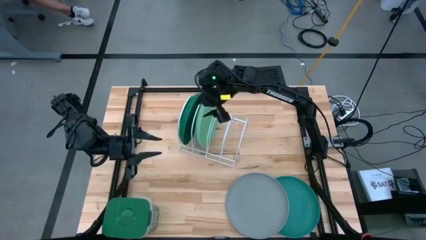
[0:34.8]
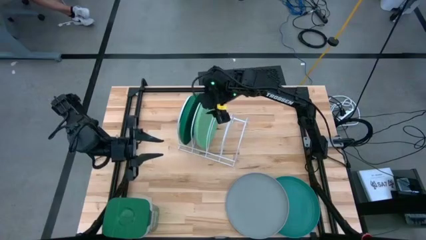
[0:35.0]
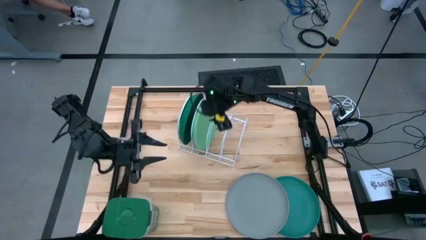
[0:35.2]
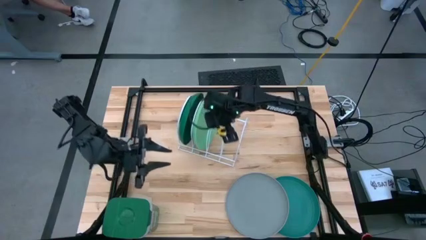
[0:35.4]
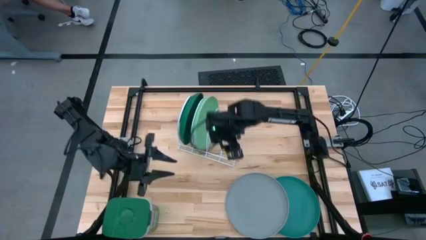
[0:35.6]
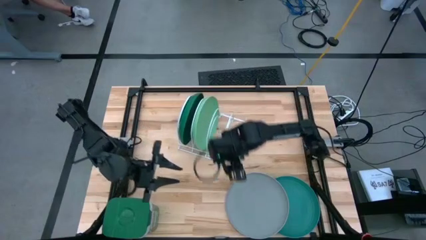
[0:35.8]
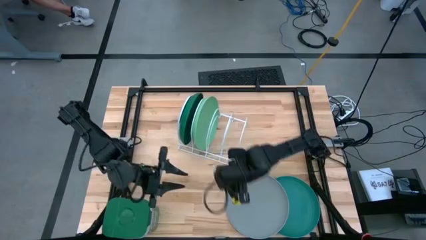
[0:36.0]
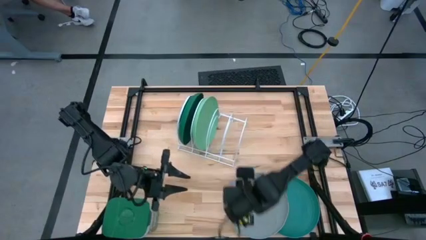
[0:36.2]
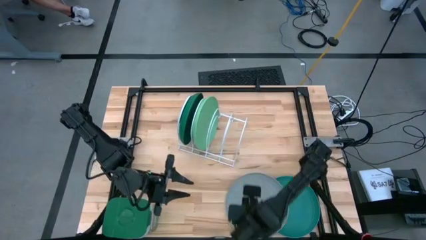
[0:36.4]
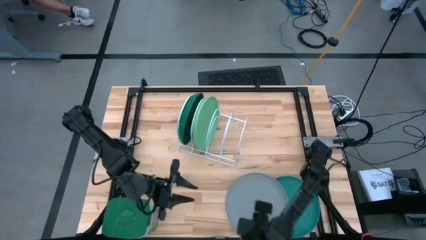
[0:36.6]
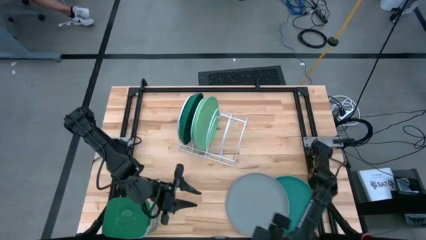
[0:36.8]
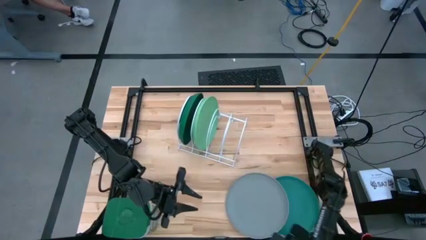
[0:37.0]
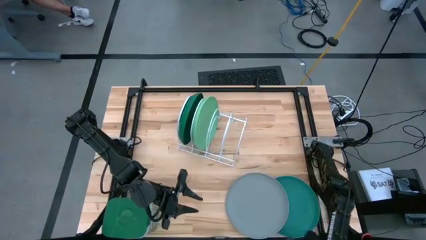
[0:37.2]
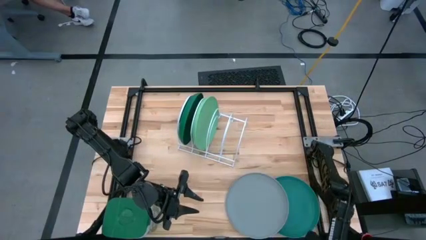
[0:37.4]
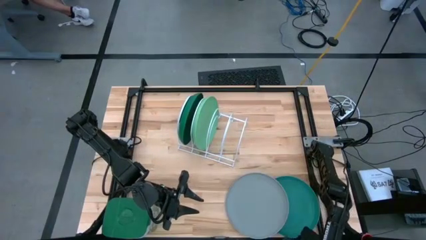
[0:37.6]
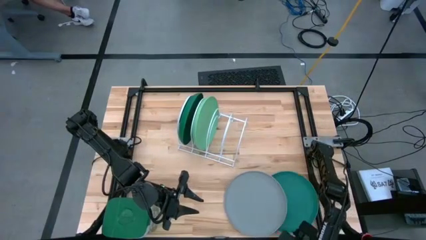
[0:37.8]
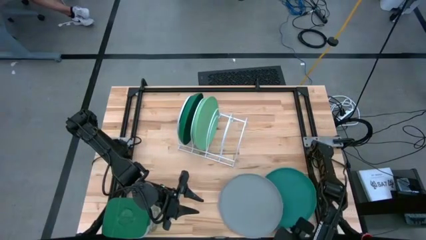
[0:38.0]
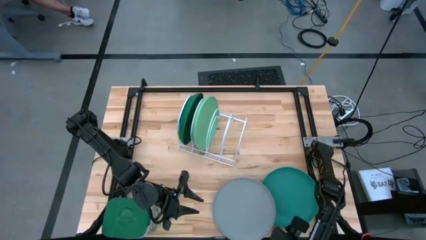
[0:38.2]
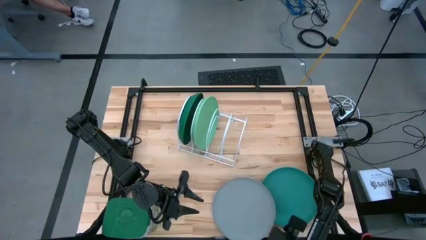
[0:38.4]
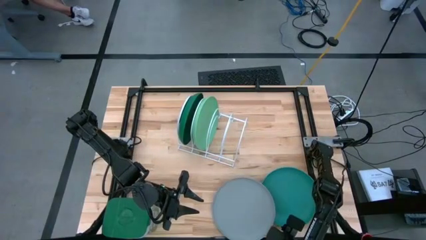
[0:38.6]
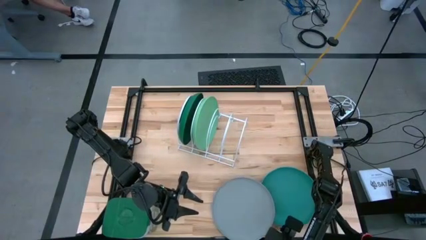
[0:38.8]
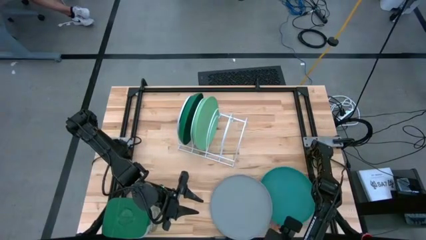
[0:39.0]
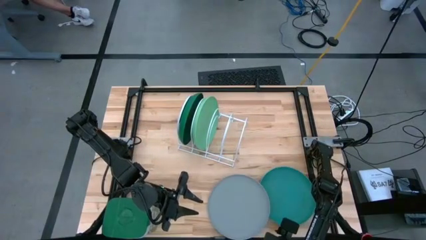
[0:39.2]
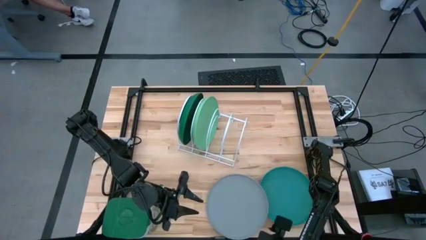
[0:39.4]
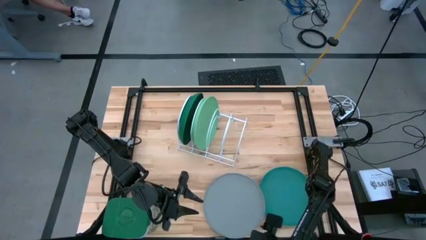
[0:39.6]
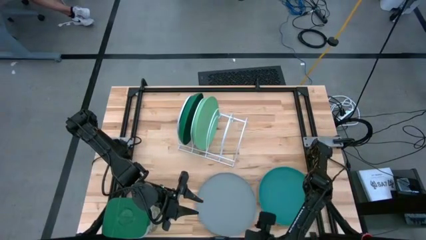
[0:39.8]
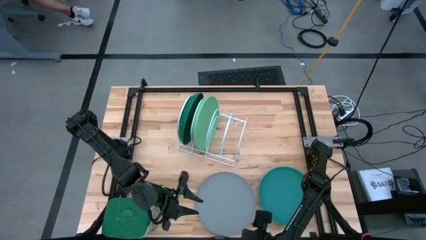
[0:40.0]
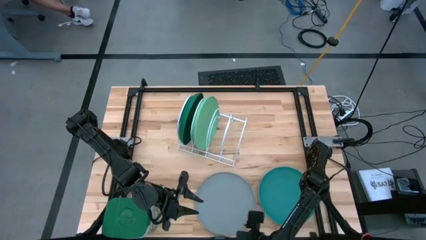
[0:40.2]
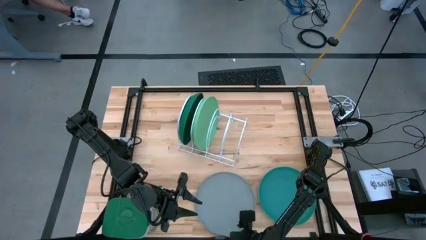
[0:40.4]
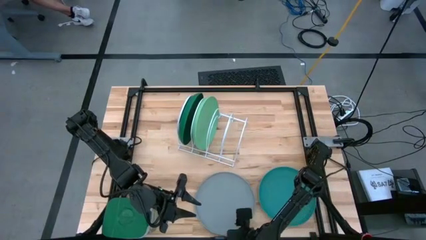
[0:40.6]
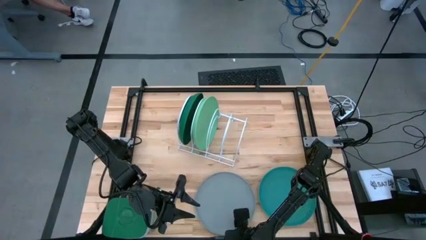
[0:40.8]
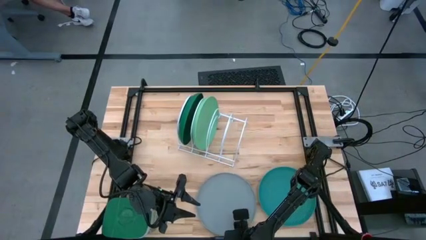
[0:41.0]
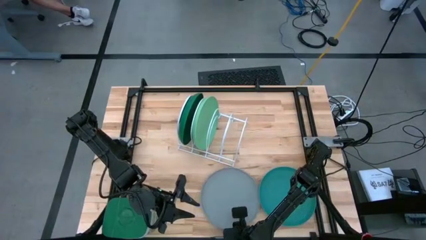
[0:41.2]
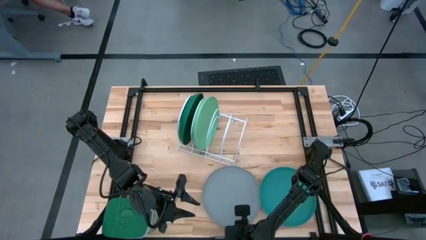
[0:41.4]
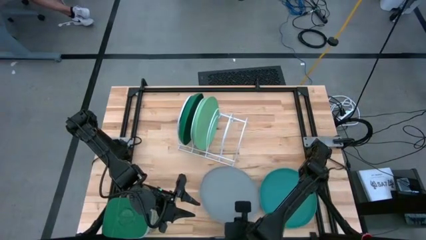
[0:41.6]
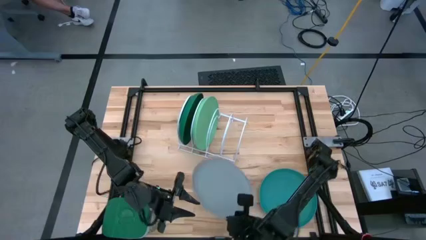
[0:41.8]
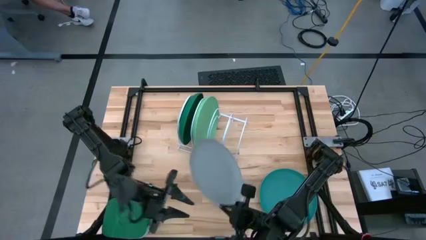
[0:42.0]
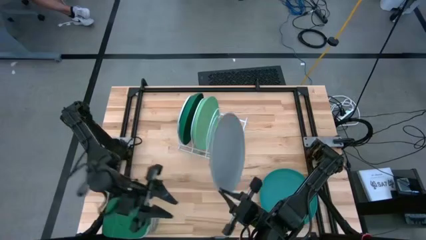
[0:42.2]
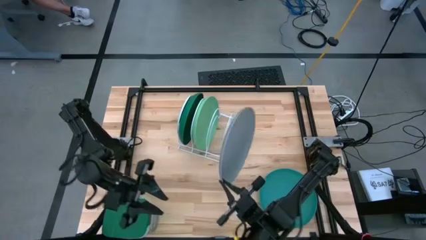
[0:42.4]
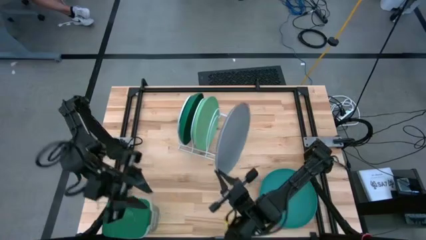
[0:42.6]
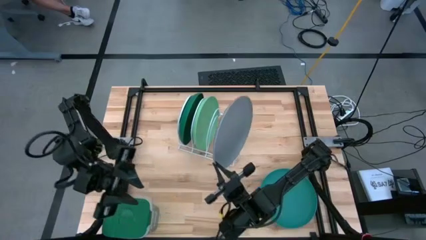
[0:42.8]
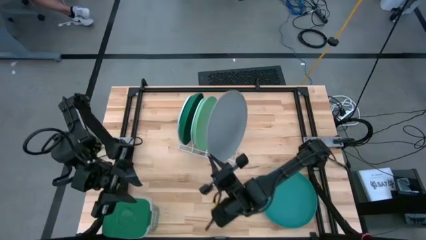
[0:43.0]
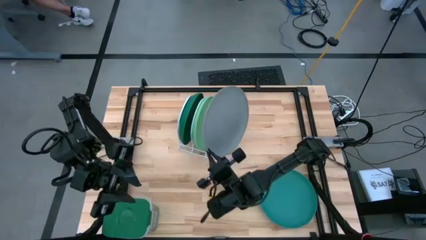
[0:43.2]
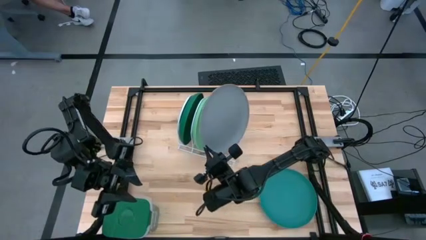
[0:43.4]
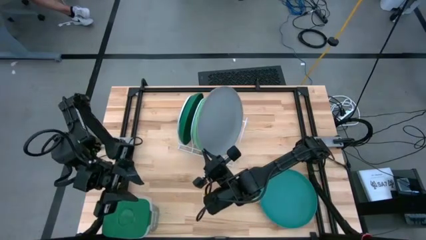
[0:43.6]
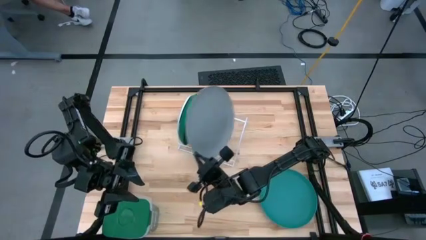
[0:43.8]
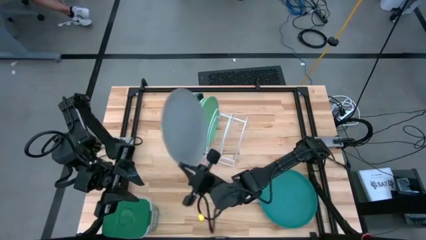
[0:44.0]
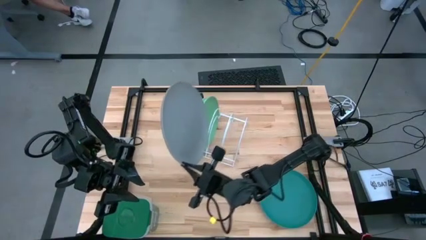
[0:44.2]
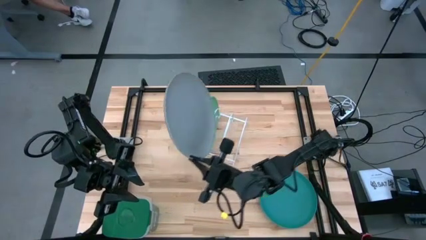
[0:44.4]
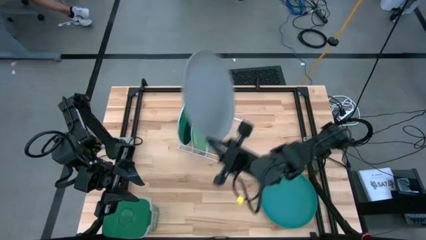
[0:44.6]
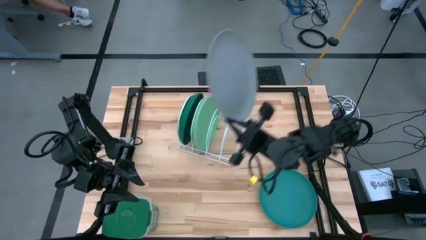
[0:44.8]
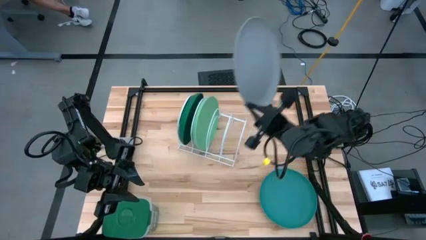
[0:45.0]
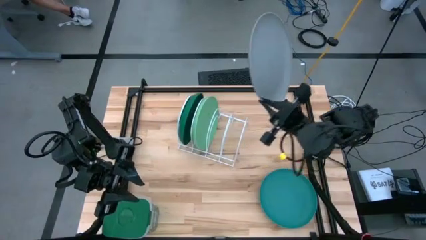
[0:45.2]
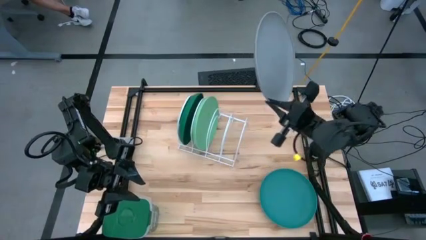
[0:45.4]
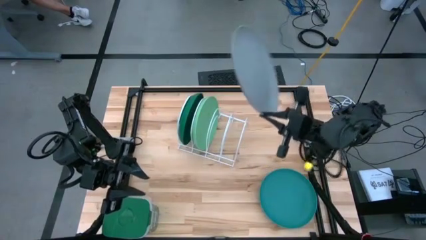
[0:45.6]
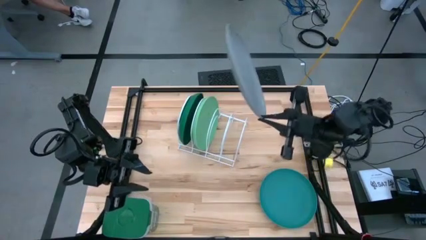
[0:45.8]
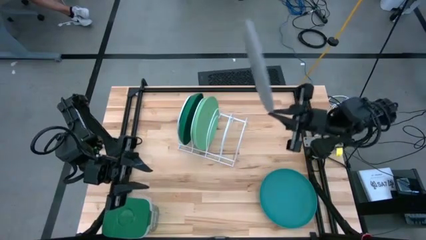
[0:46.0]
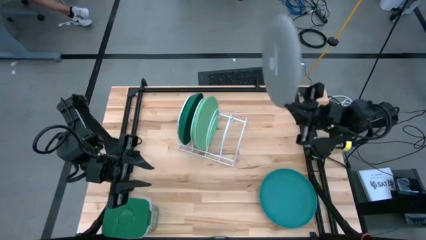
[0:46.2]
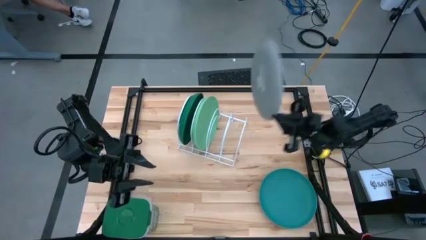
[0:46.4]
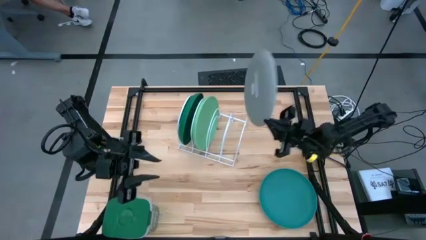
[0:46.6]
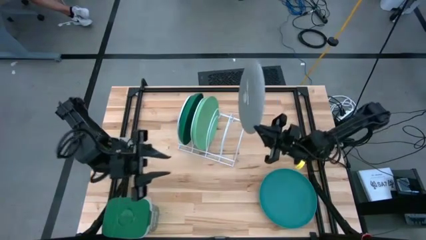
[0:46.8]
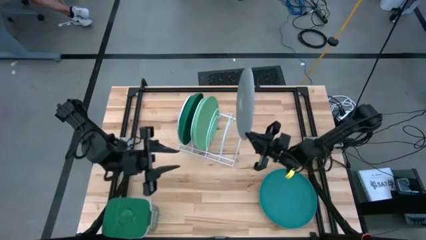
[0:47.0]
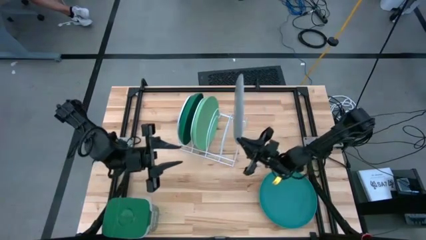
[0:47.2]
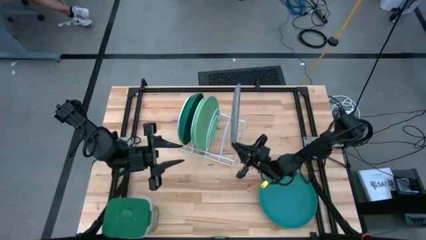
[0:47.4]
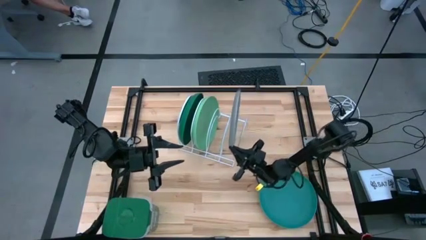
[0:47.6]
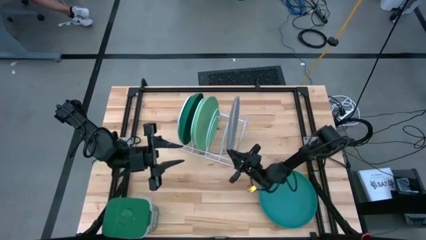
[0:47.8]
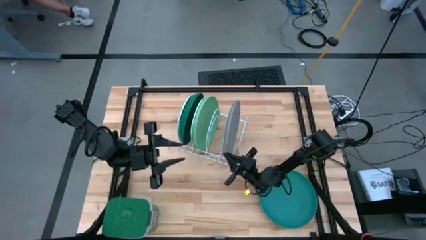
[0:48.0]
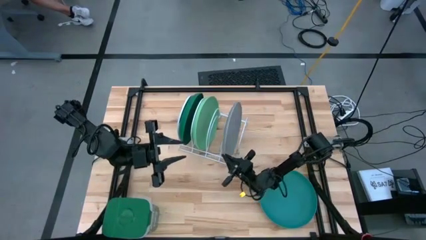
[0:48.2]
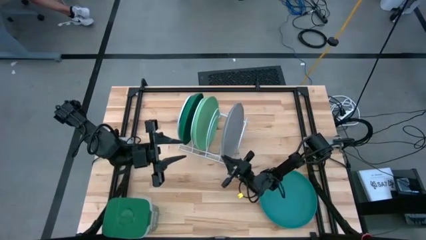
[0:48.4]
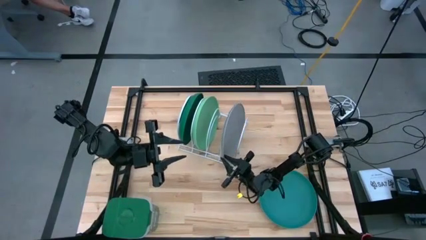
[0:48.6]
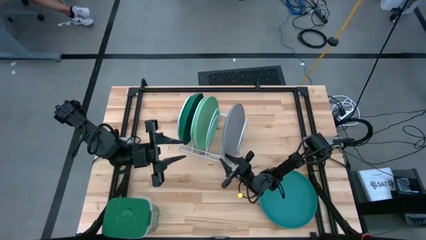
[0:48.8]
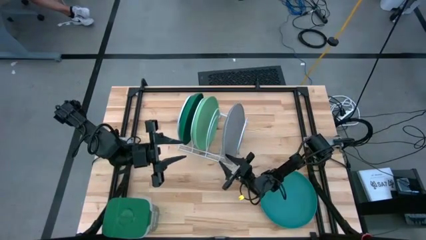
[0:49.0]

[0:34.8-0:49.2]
Task: Sort dishes
Put the gray plate into the white dish rack
